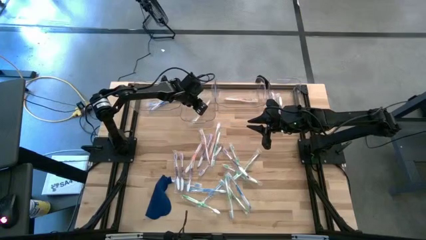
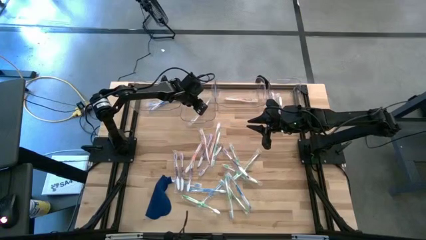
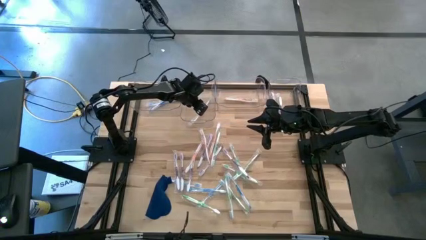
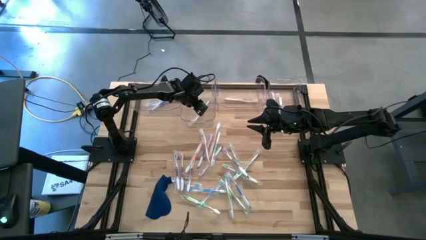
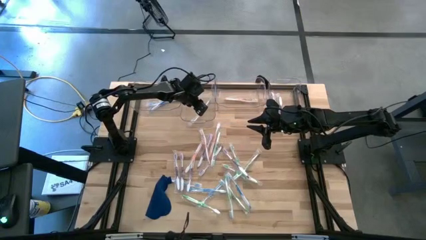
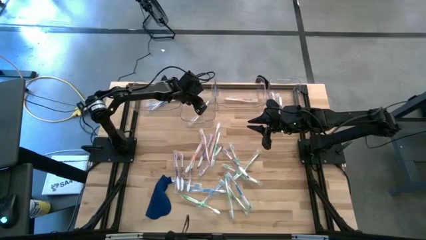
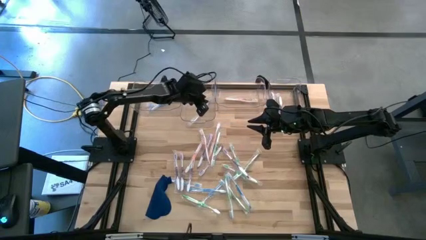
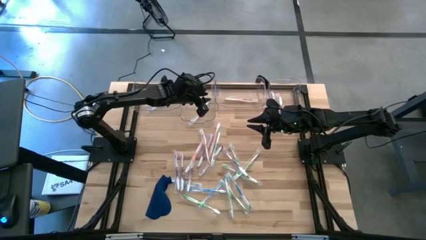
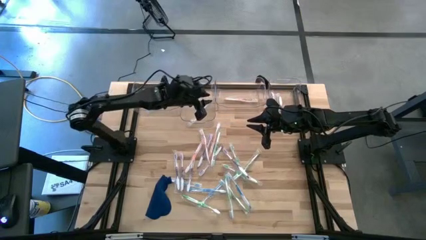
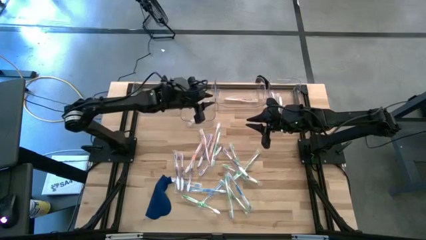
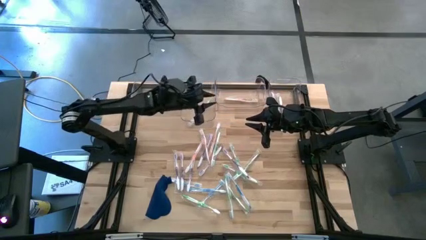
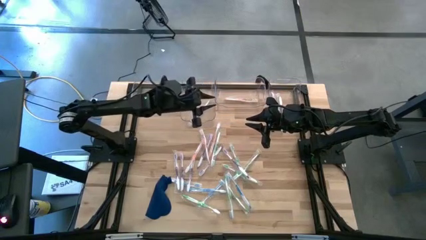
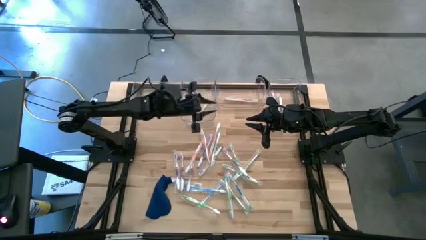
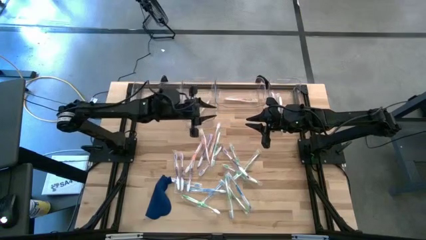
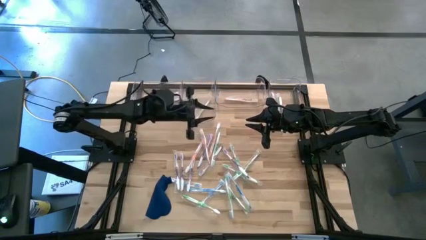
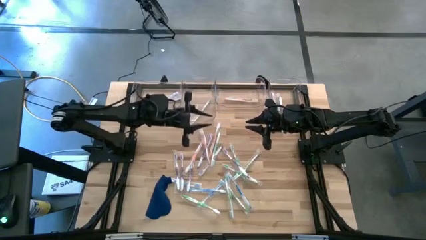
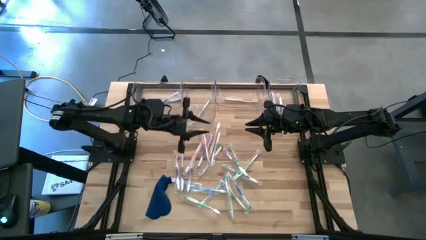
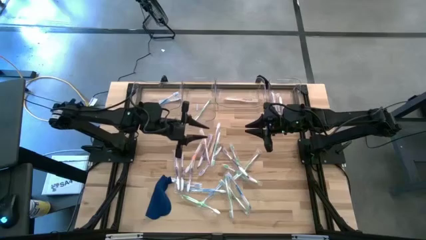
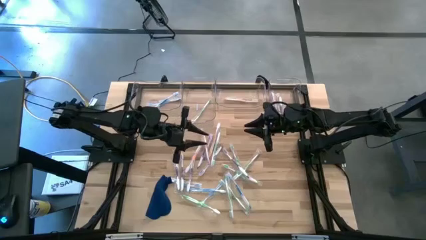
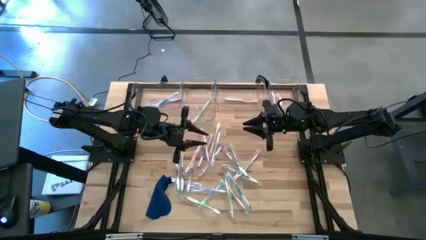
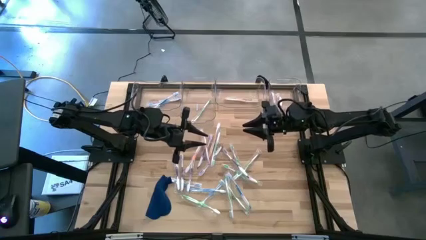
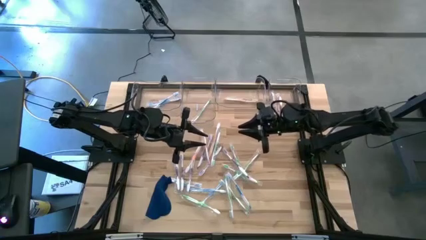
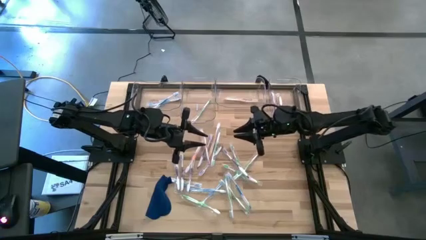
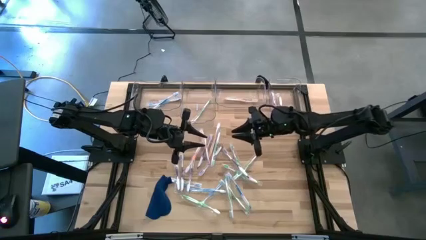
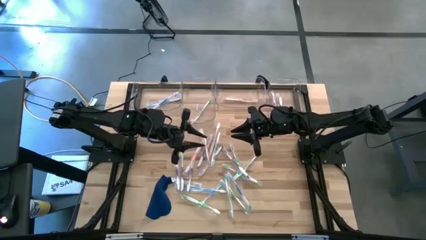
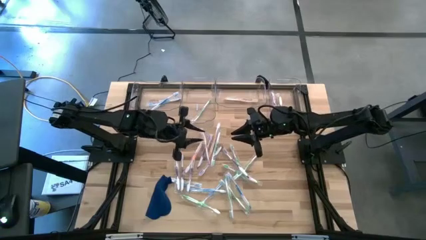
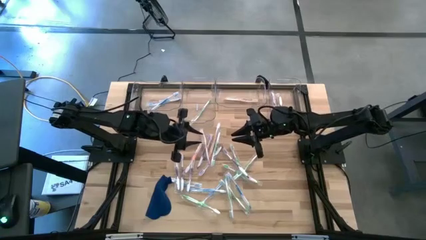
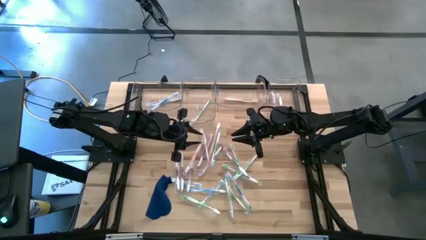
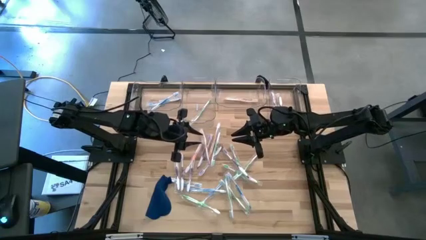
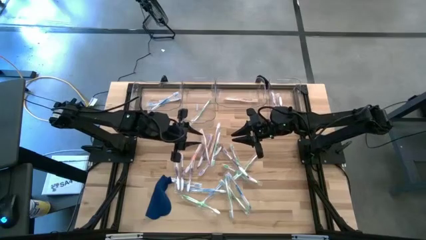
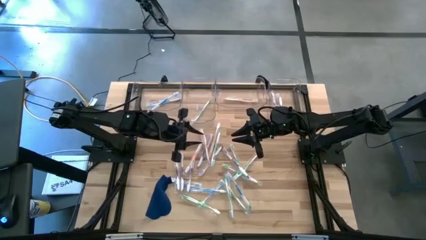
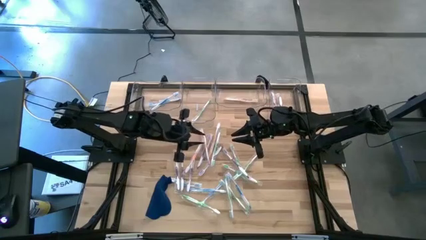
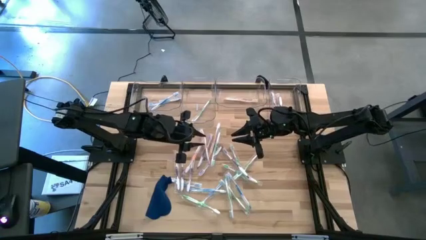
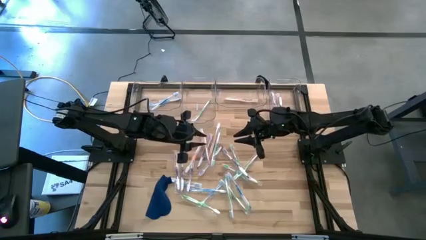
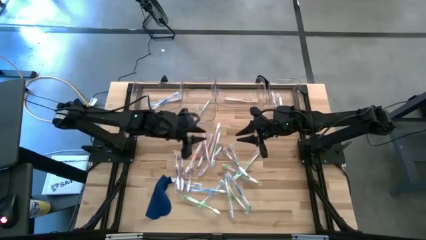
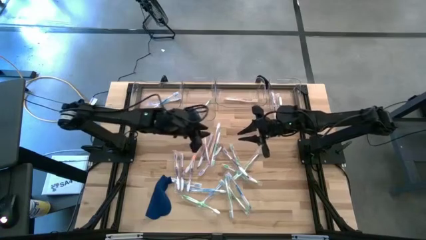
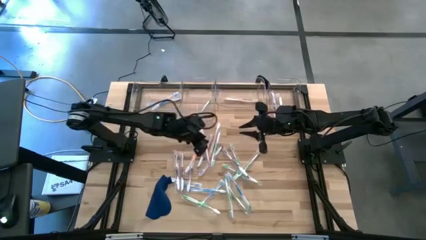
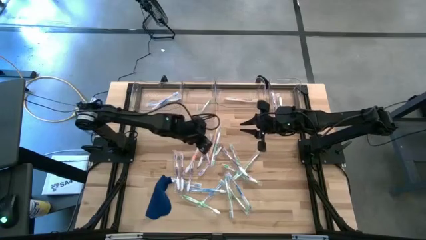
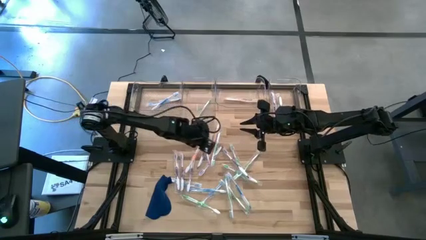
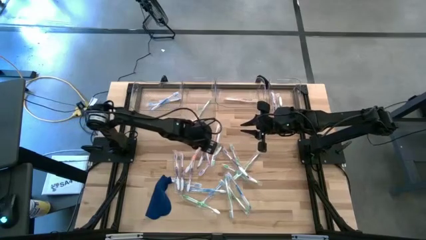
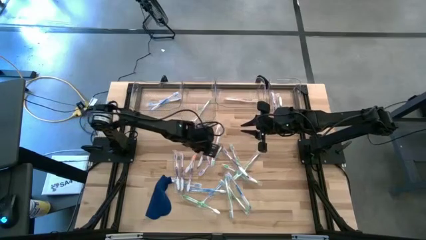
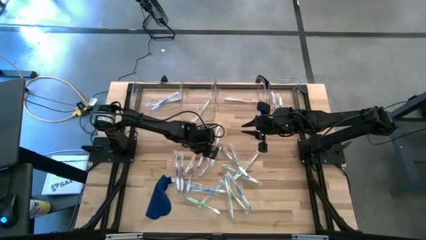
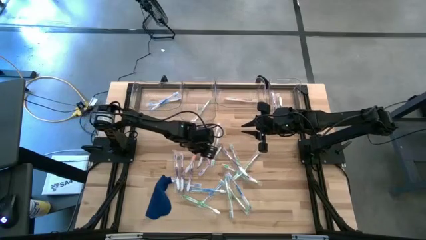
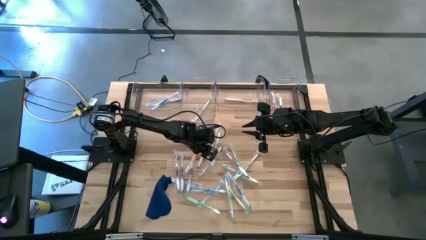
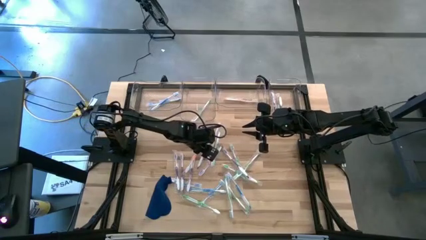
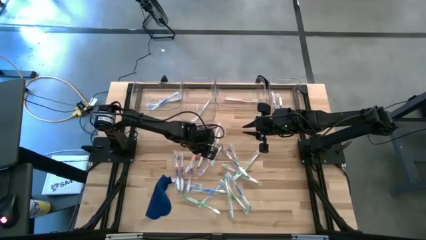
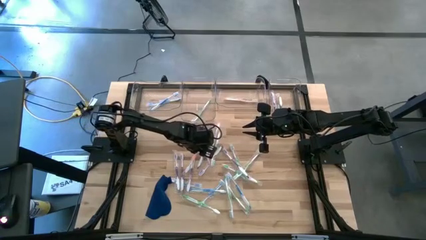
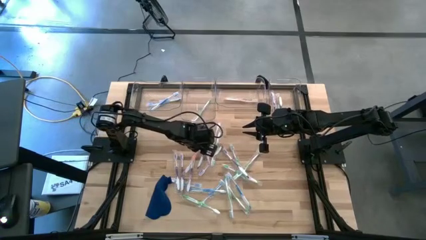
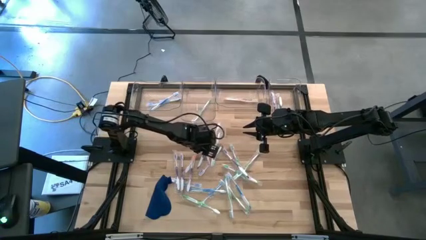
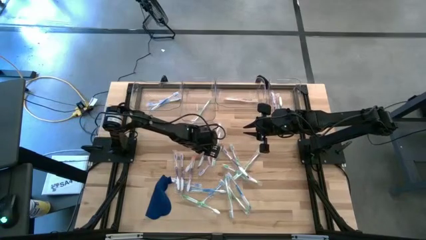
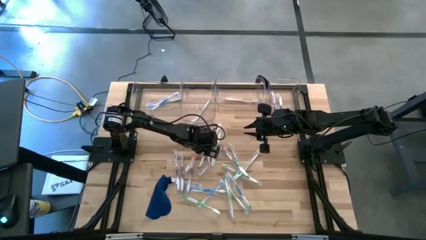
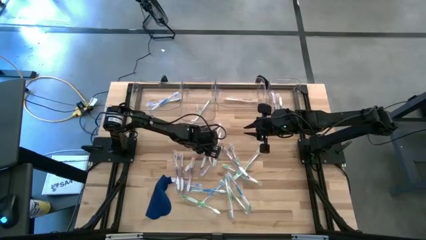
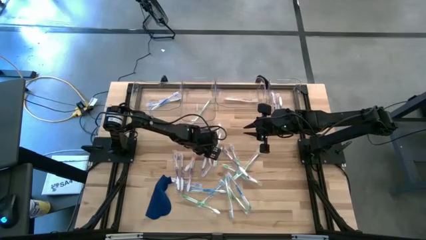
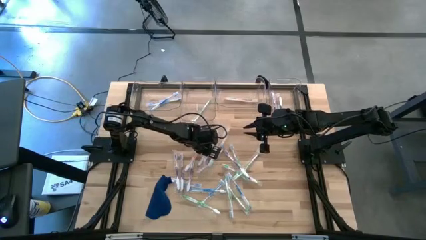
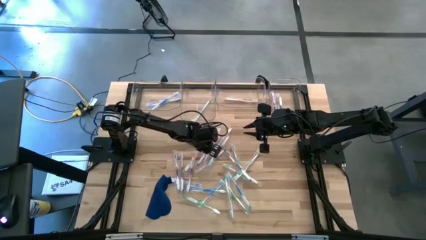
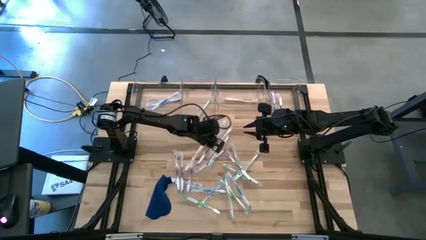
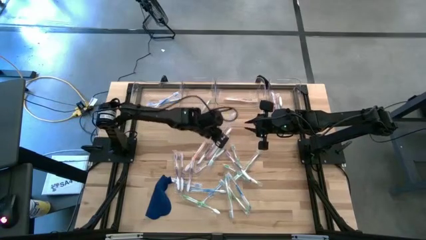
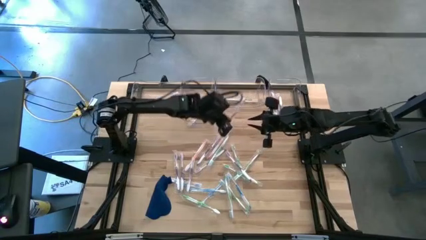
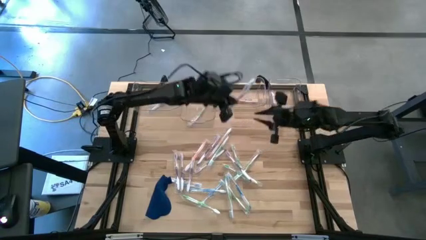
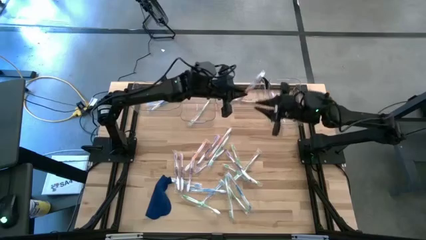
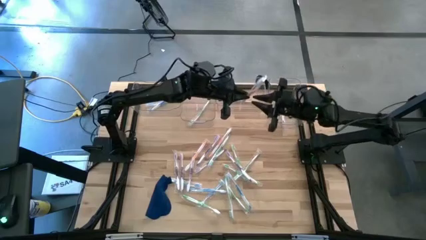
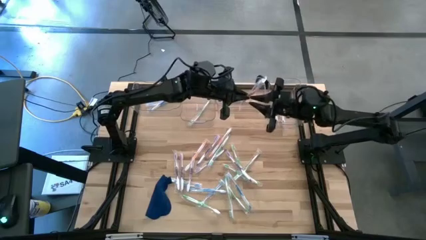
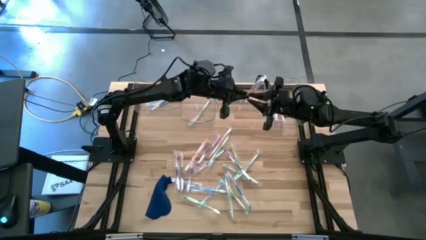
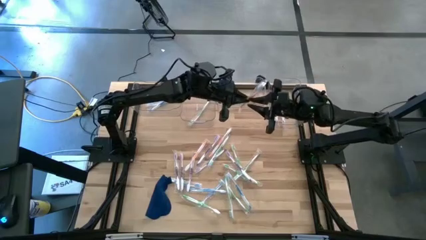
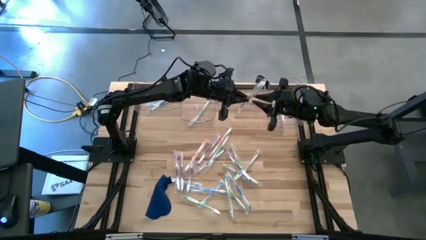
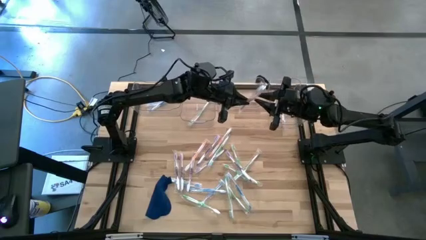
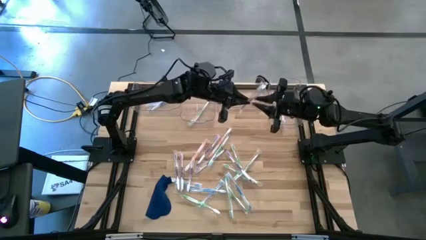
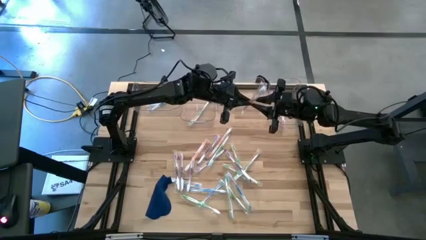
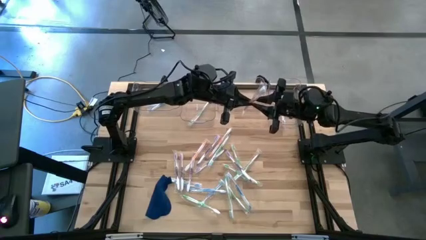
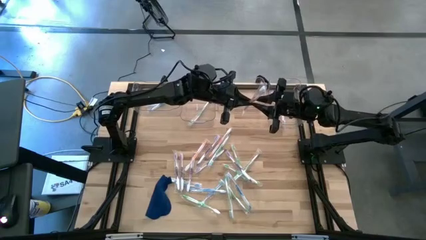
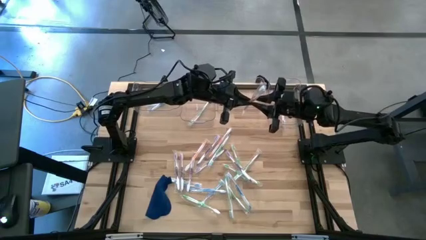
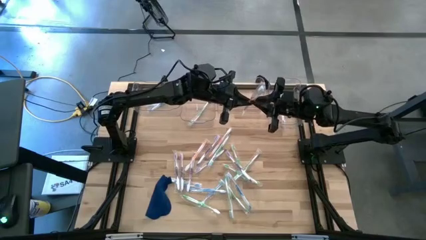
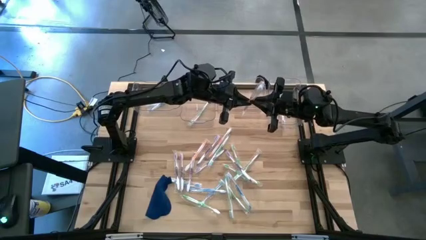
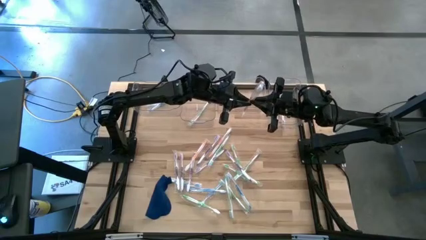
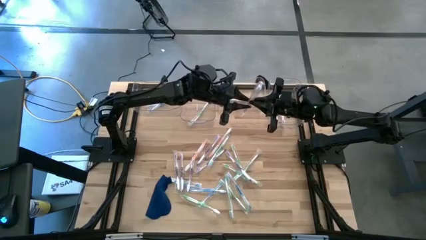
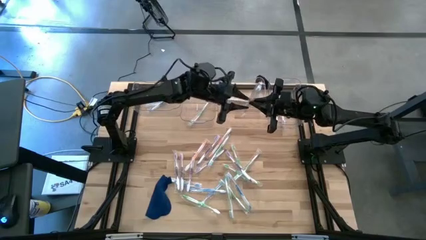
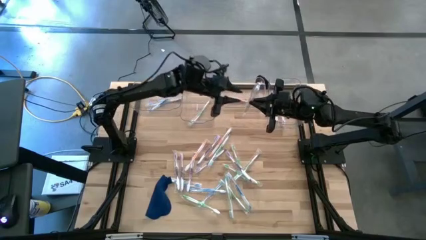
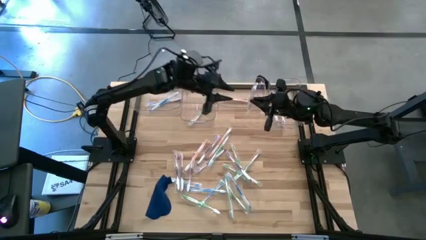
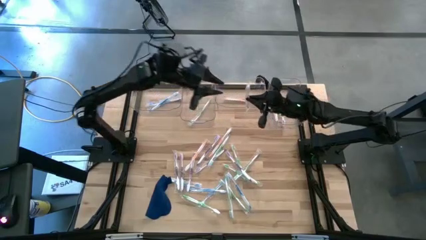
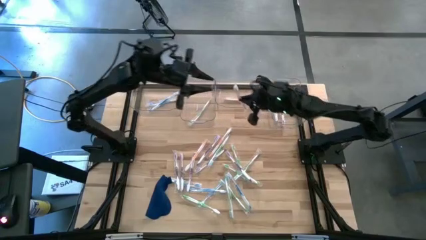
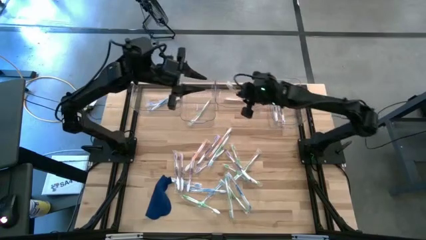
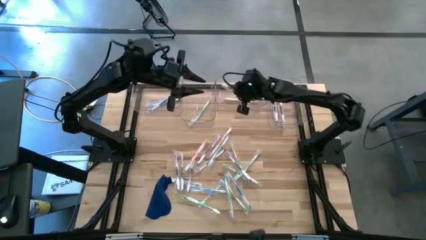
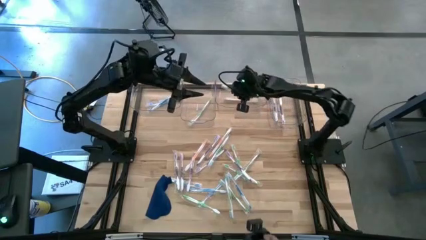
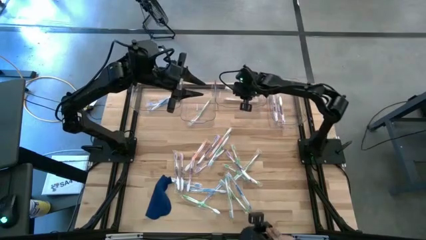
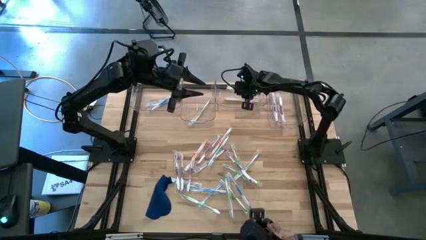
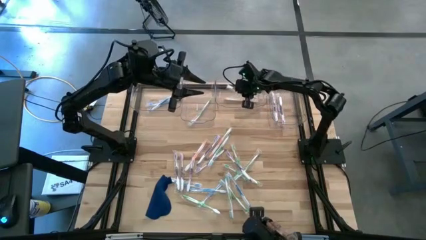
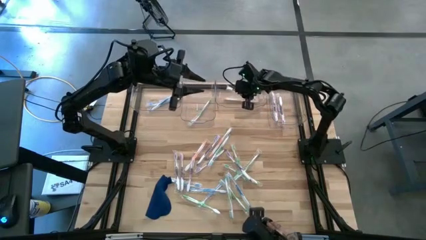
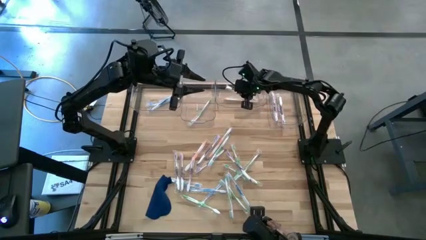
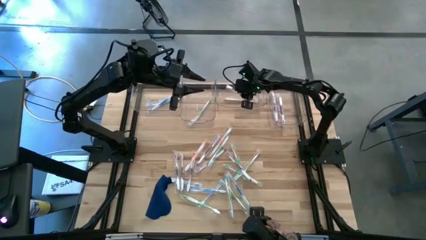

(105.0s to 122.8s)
Task: Pick & Place Toothbrushes
Put the orange toothbrush into the middle right transparent bin
